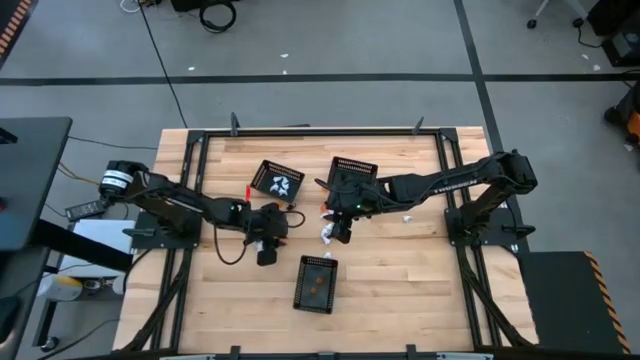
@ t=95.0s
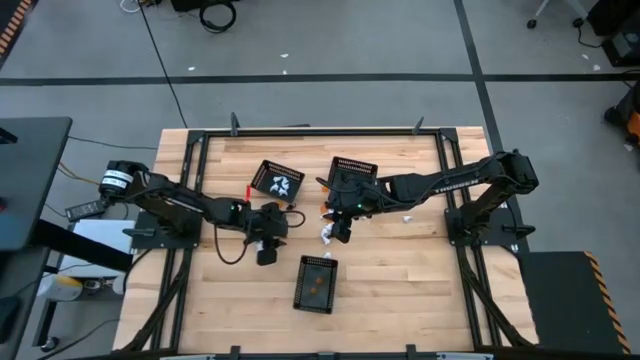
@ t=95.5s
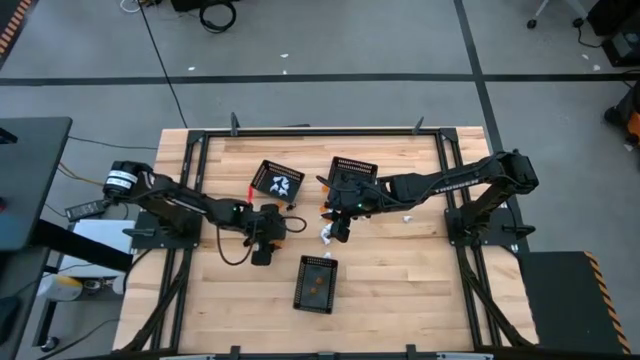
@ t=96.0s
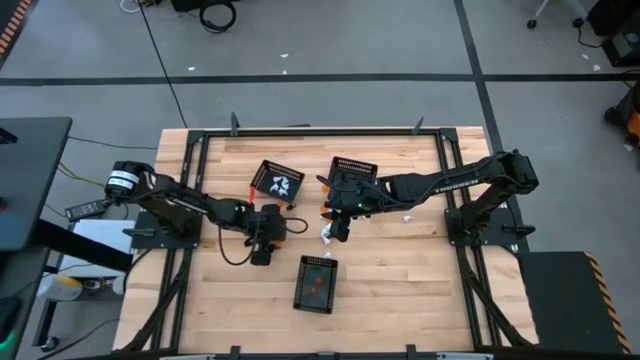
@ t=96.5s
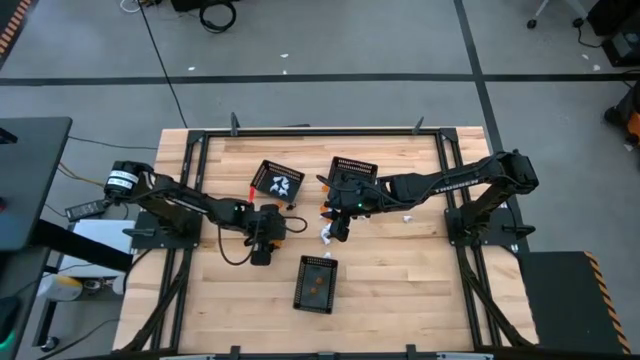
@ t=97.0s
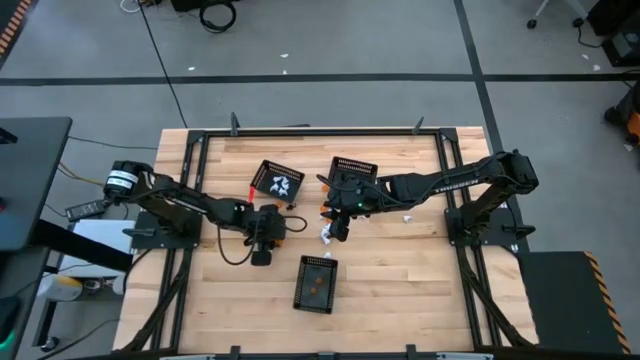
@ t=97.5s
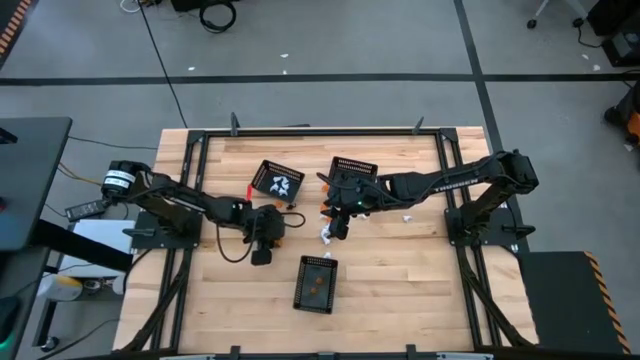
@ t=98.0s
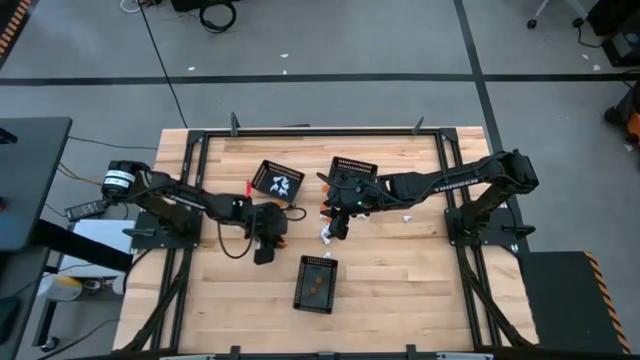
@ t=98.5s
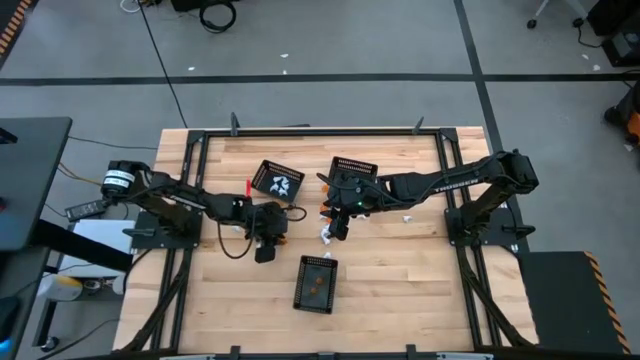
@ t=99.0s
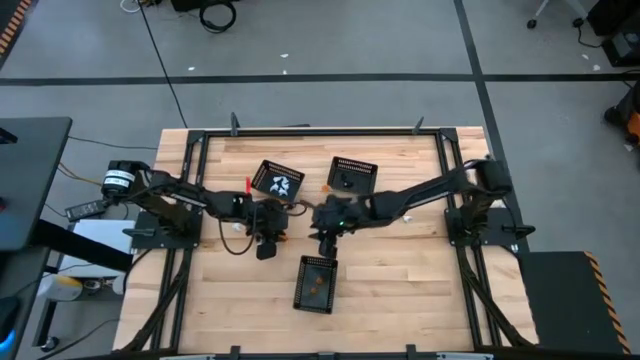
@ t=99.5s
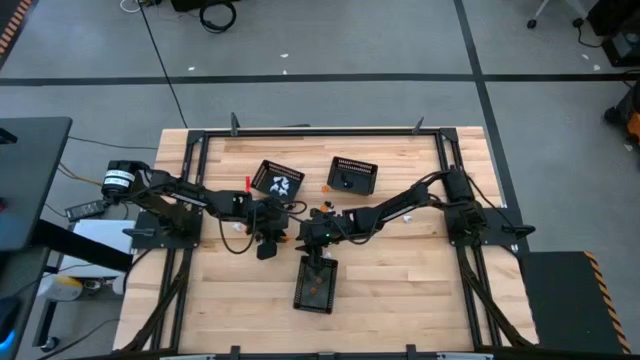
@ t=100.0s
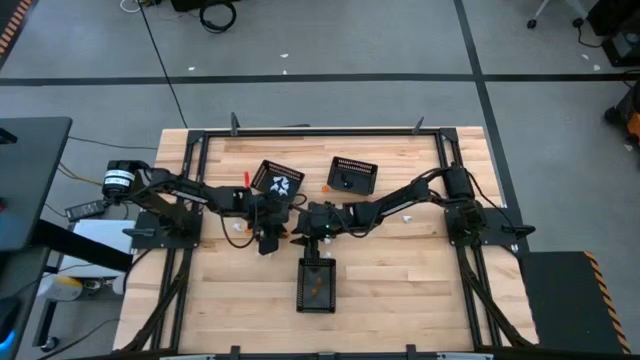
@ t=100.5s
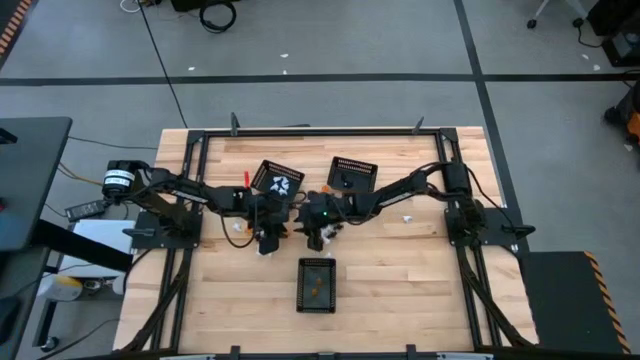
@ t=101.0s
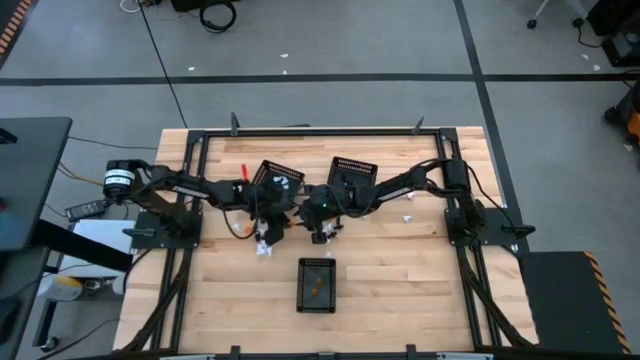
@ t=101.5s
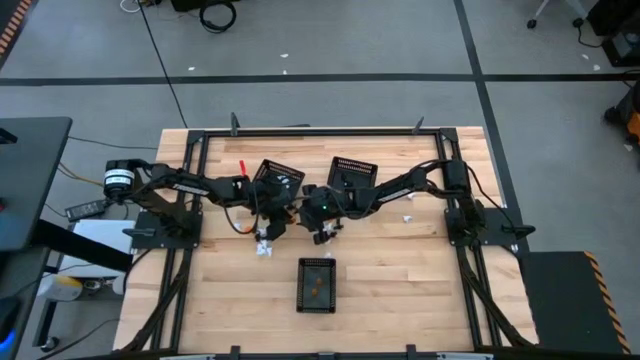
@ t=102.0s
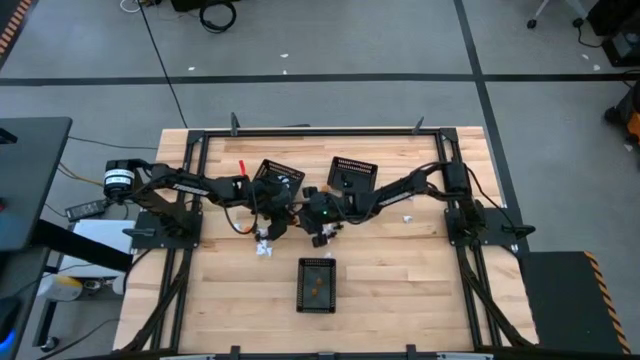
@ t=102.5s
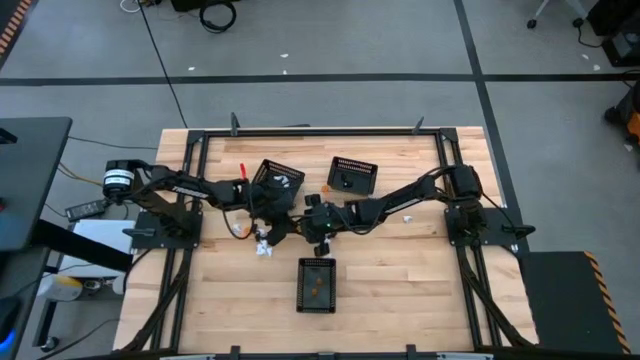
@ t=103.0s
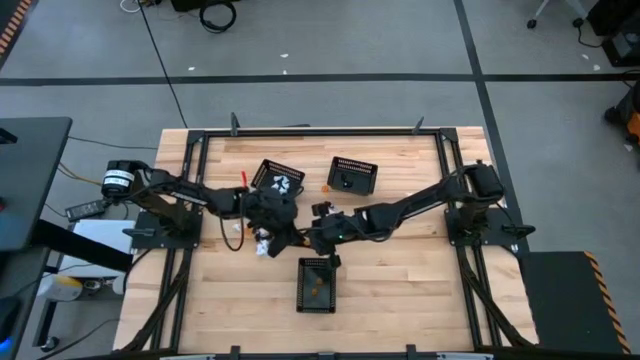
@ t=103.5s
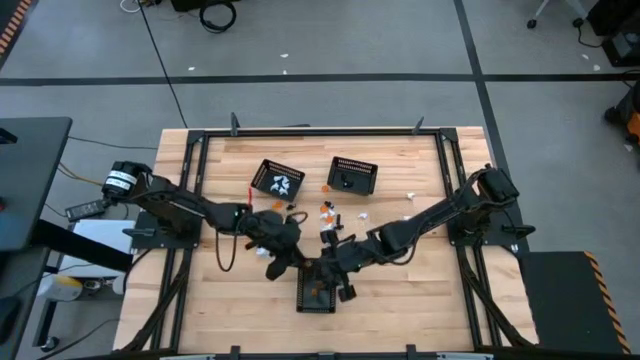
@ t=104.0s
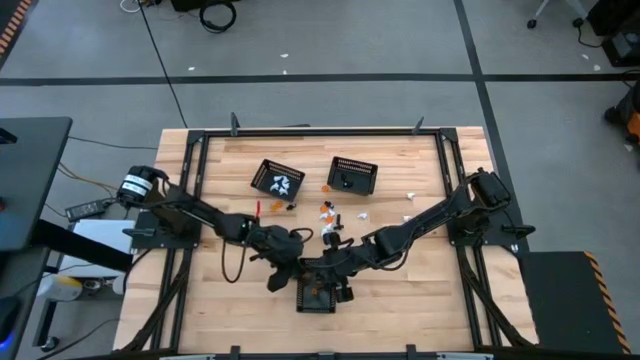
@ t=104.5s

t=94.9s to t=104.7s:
Task: Sort Halloween decoration
Put the orange pumpkin toy into the bottom black basket

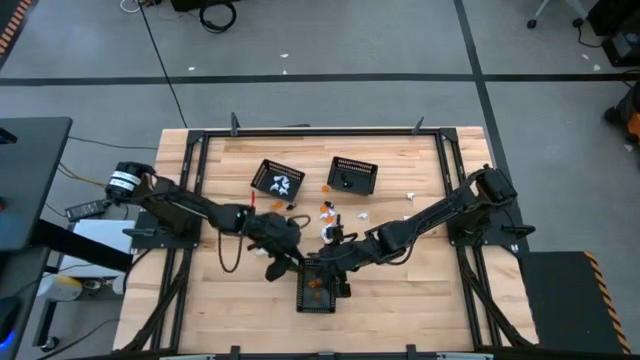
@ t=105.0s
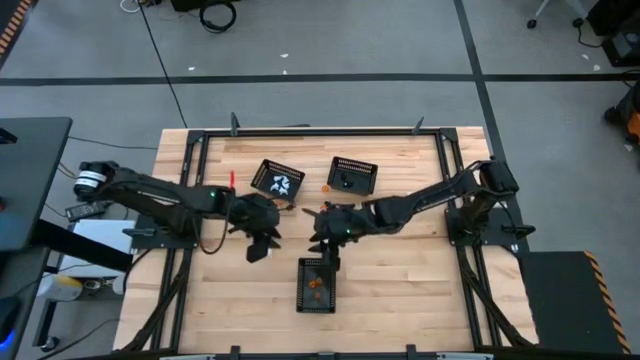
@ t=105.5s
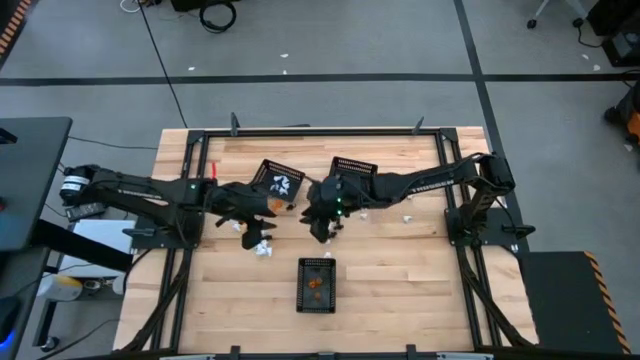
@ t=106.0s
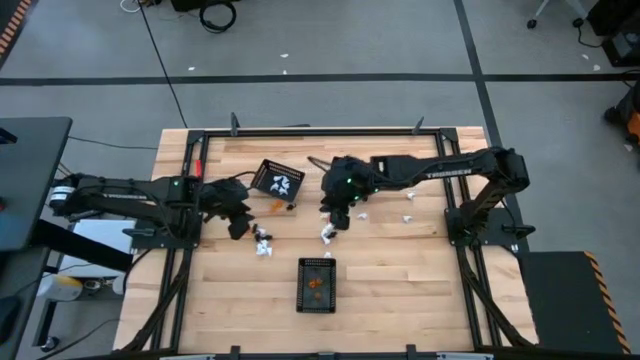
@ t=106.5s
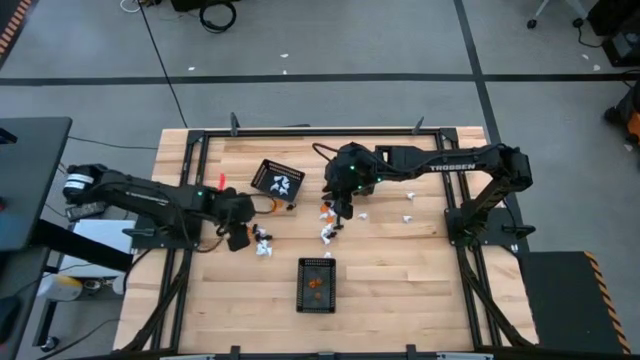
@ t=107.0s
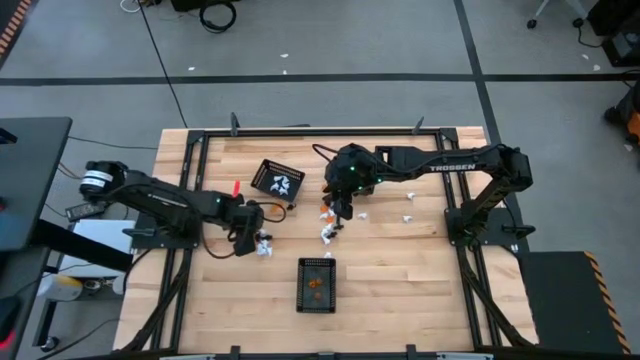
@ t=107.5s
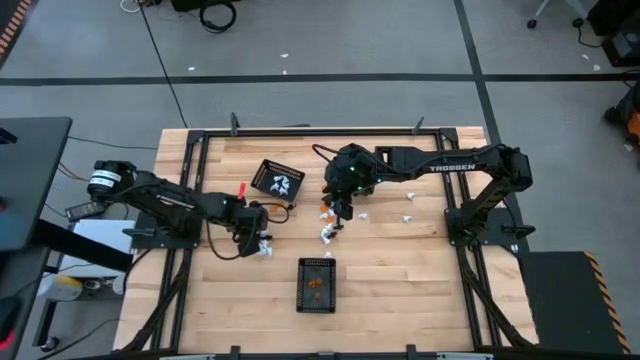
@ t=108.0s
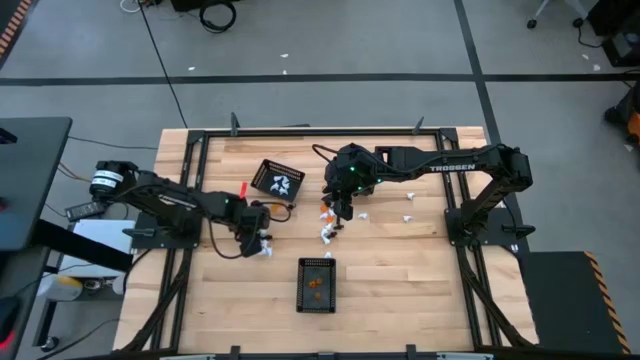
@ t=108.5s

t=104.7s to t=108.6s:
Put the orange pumpkin toy into the bottom black basket

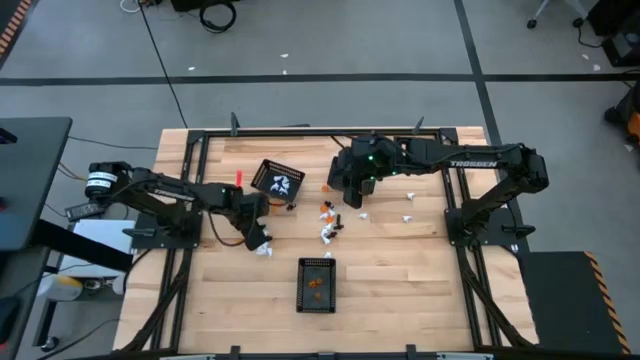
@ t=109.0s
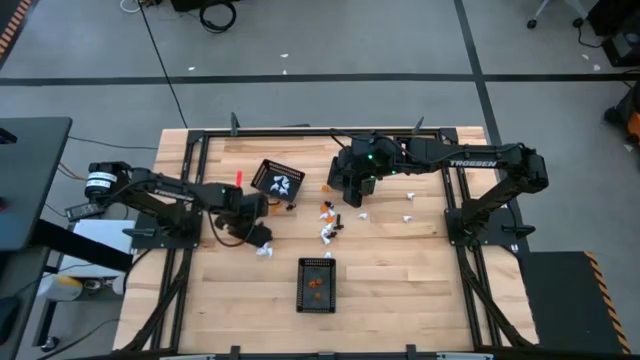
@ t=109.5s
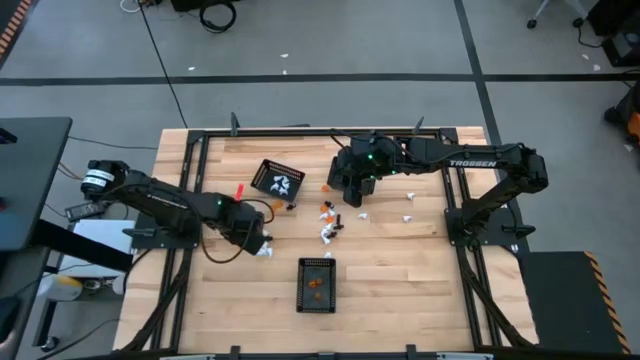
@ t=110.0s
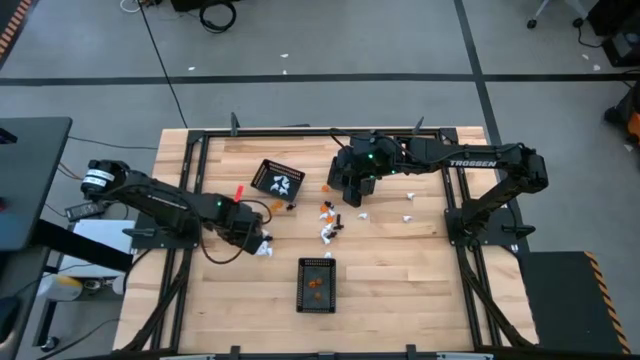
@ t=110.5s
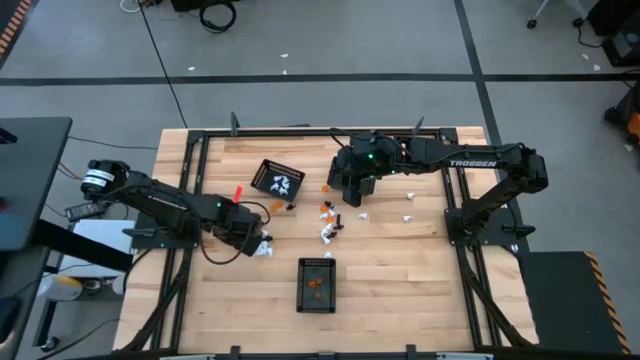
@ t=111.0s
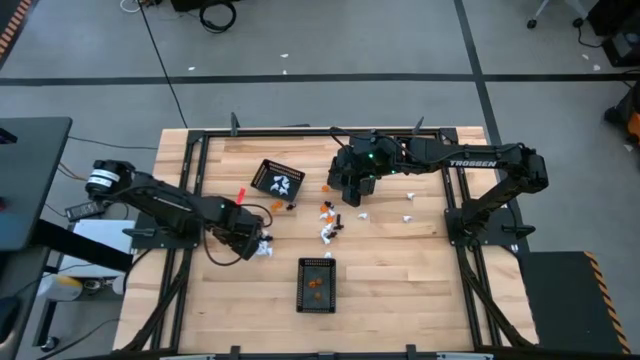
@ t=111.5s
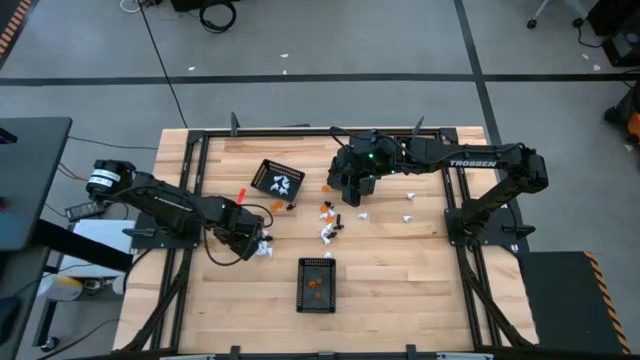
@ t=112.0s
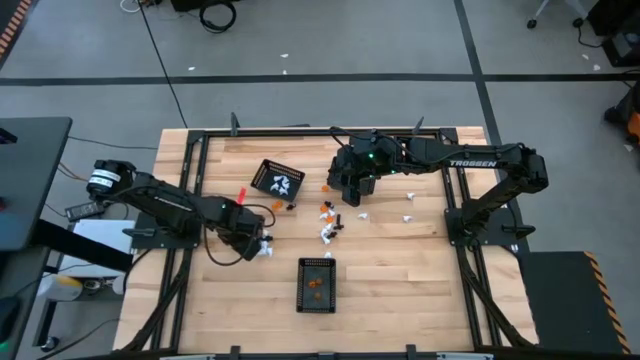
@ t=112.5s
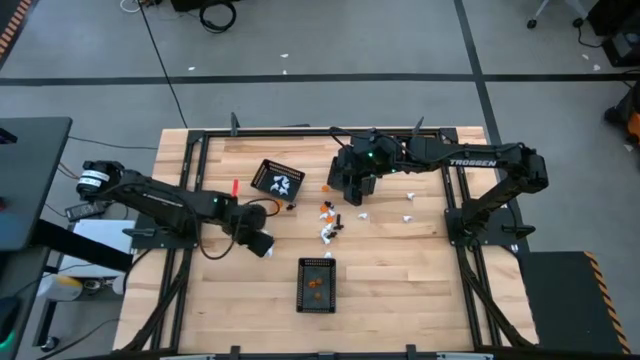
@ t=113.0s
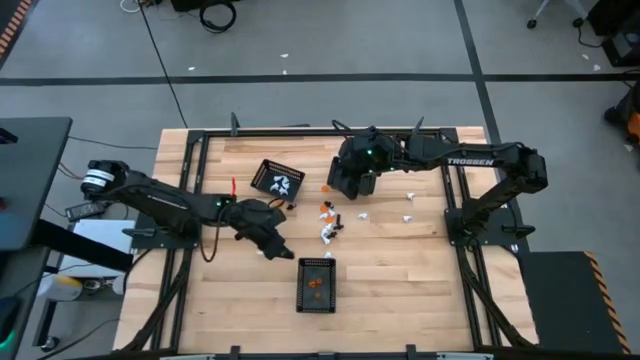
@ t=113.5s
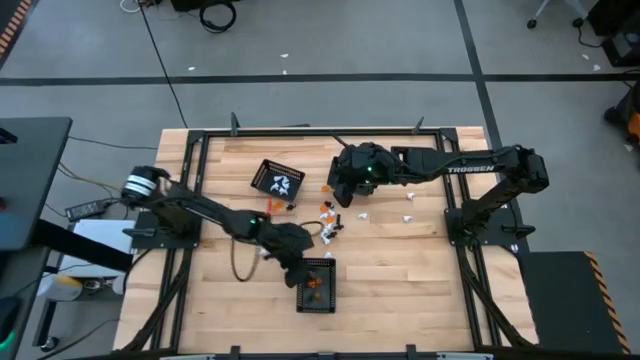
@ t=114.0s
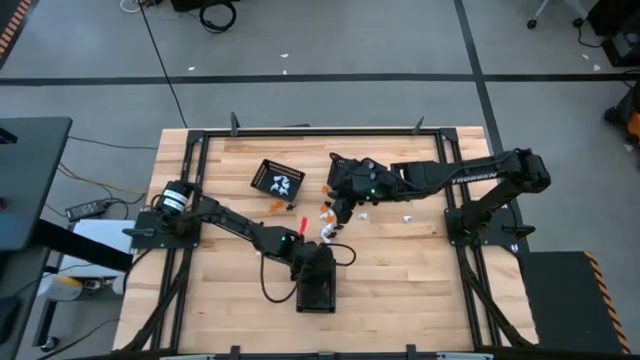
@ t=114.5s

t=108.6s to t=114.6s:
Put the orange pumpkin toy into the bottom black basket

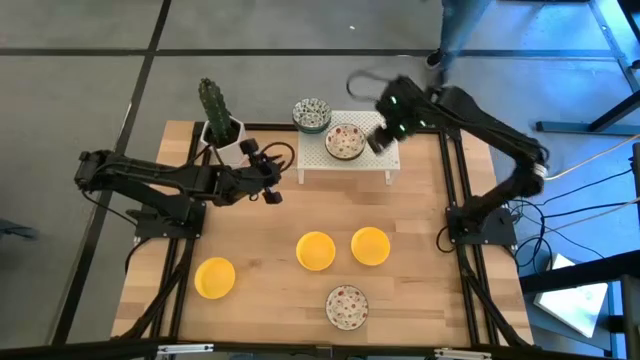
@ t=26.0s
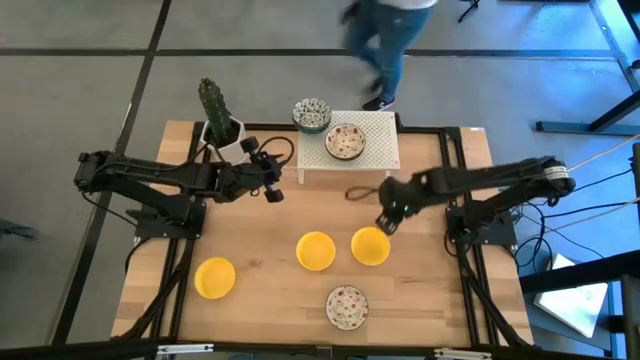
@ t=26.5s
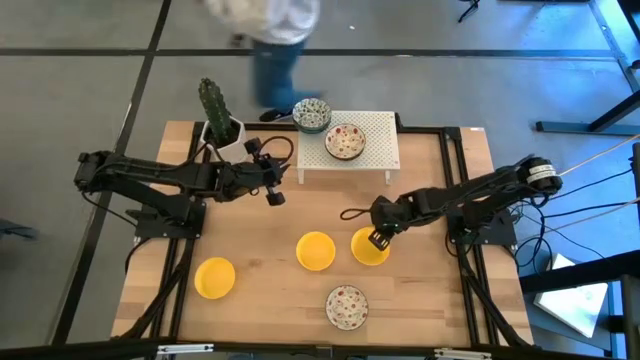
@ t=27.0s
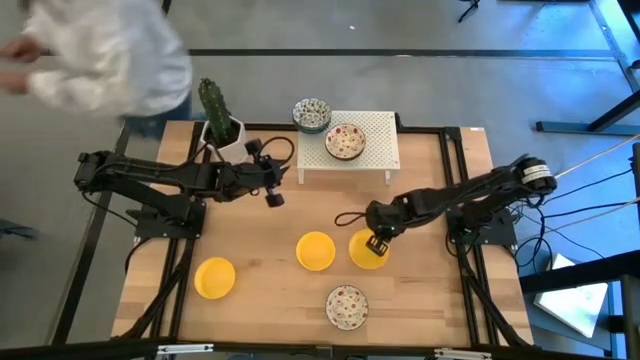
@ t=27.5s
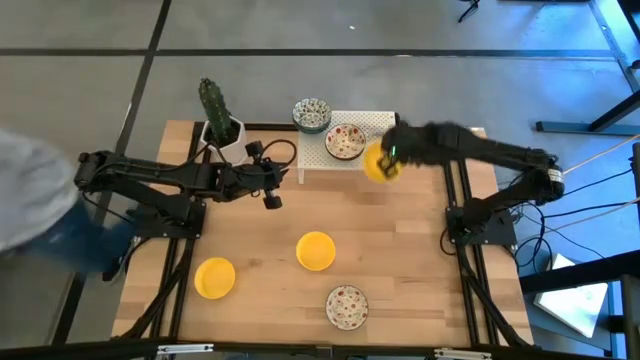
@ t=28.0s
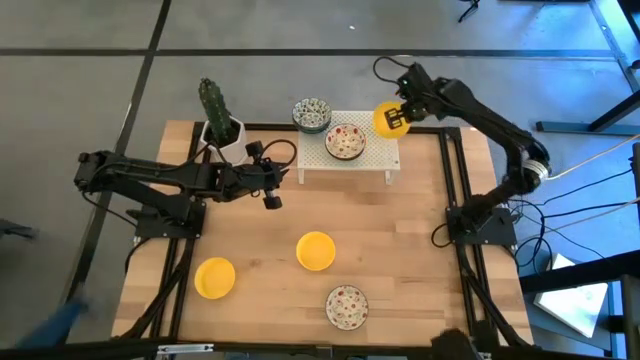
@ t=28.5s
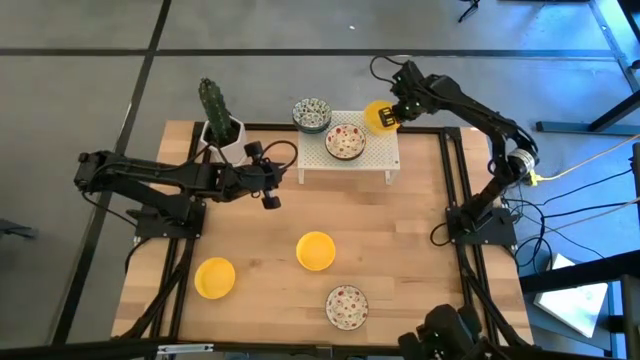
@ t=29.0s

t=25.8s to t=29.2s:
Task: Pick & Place Mini bowls
Put the right yellow bowl on the shelf
